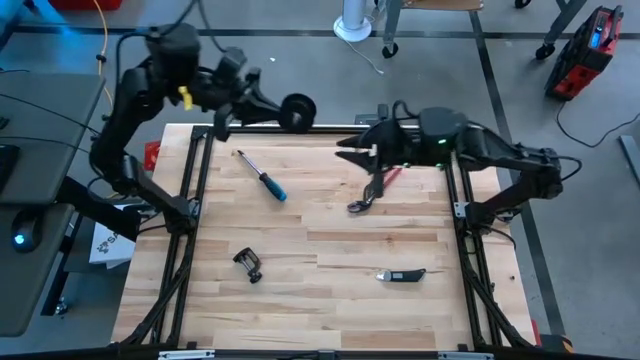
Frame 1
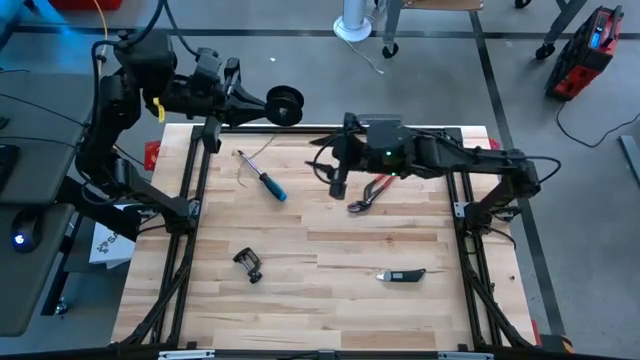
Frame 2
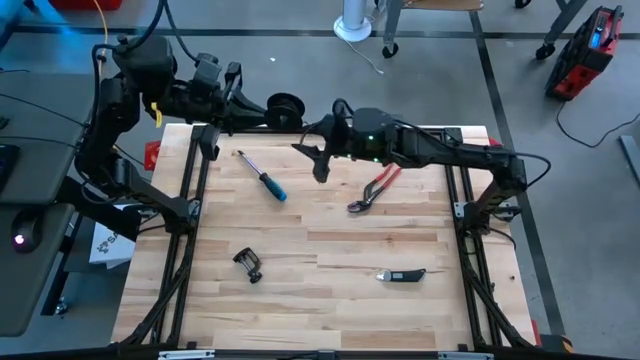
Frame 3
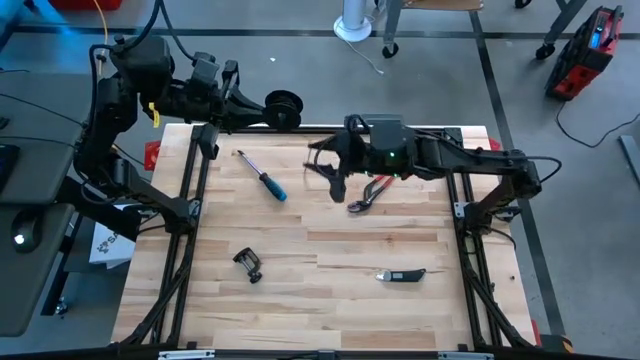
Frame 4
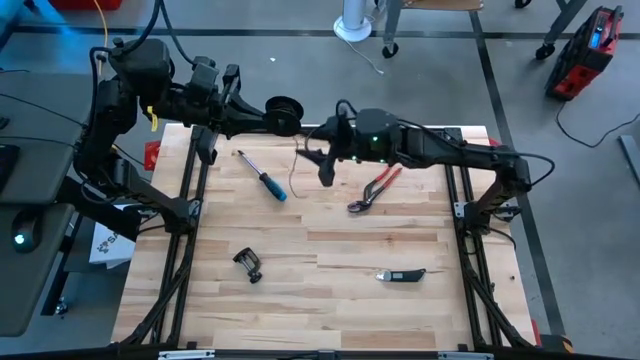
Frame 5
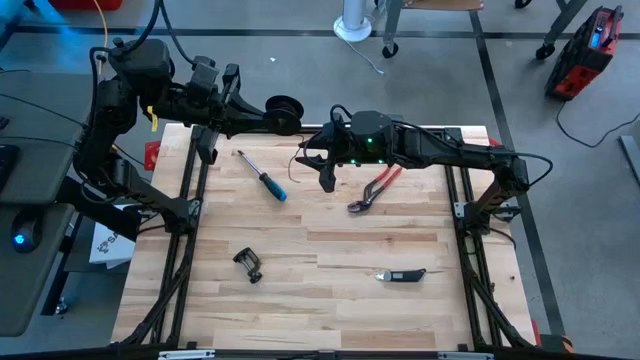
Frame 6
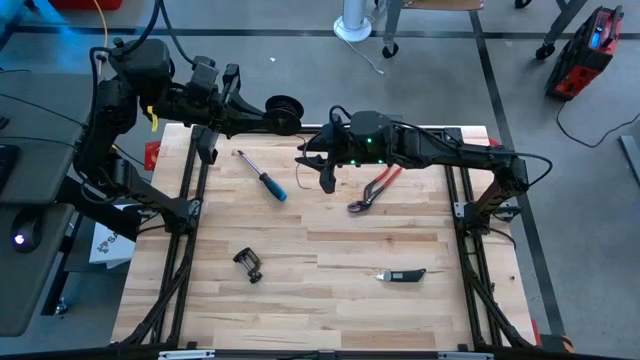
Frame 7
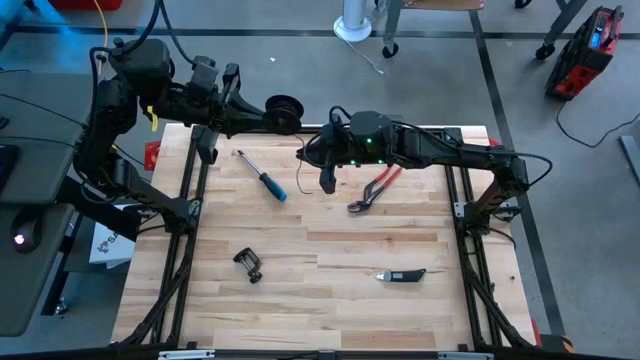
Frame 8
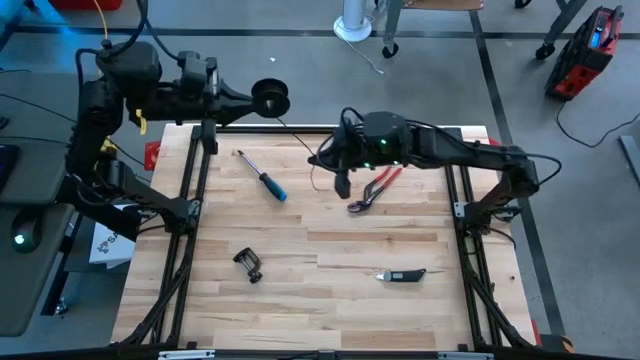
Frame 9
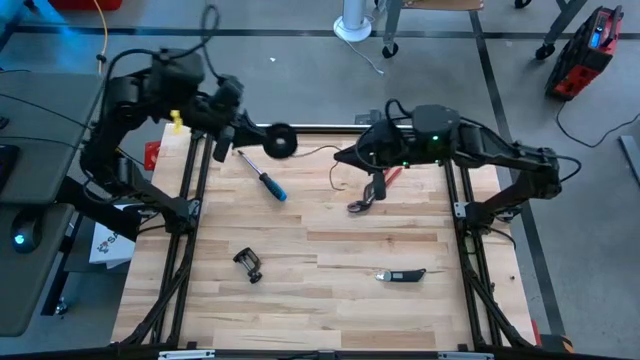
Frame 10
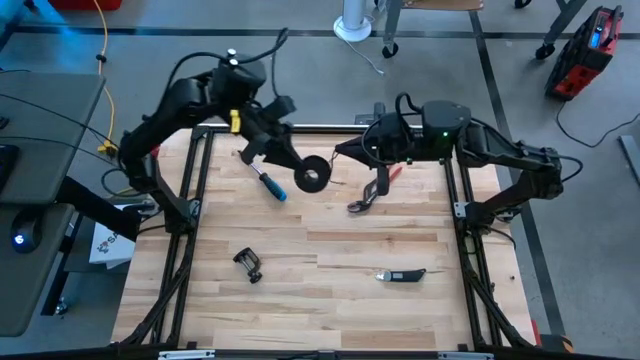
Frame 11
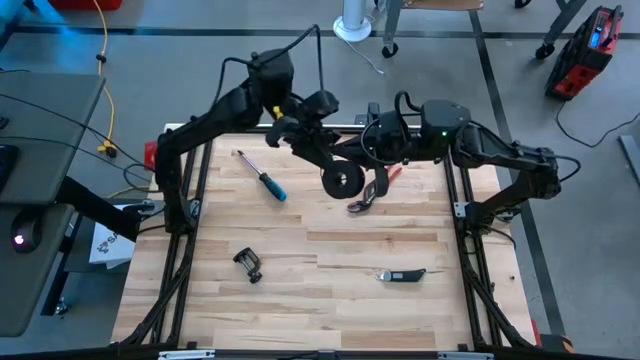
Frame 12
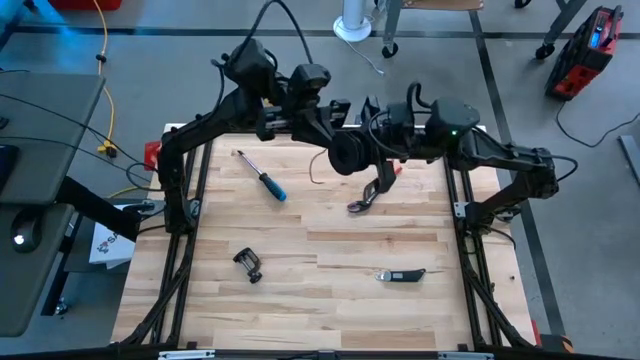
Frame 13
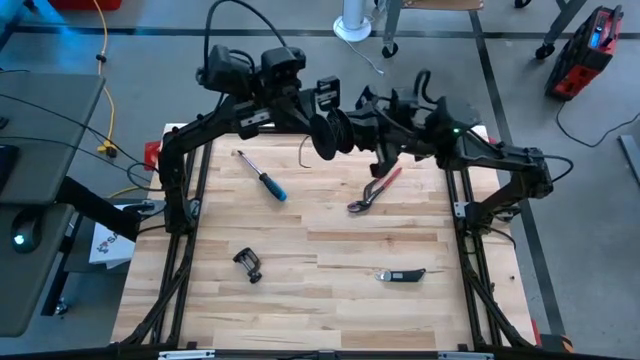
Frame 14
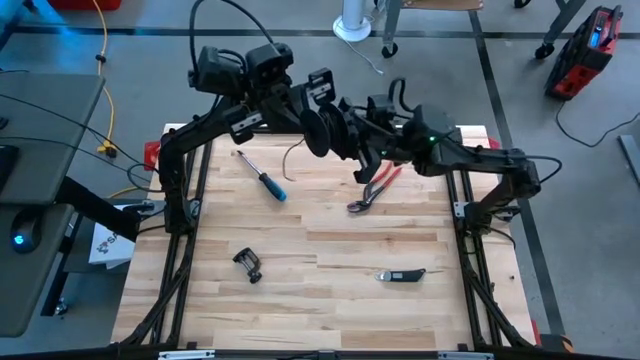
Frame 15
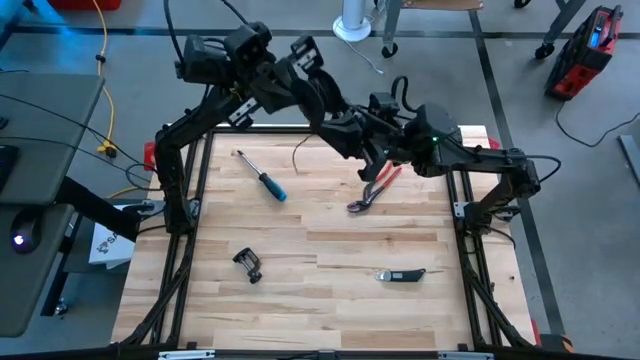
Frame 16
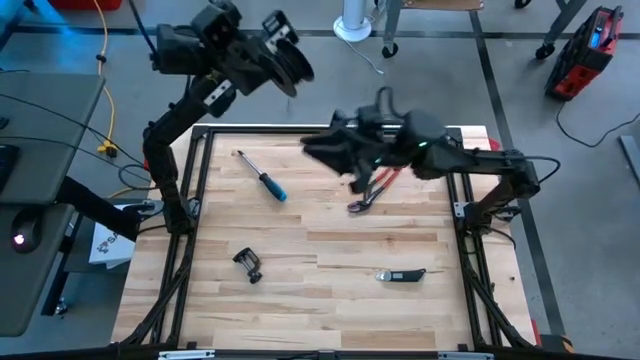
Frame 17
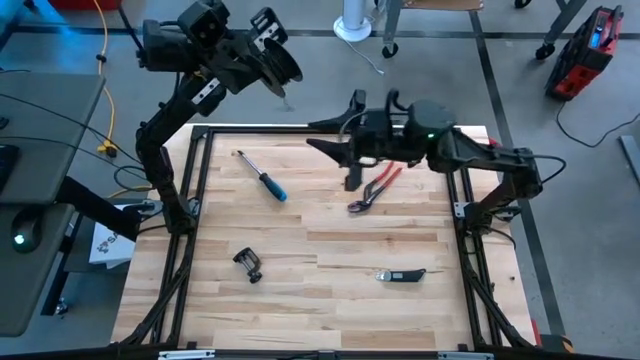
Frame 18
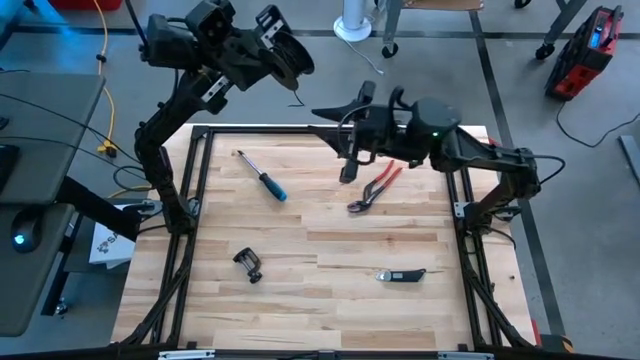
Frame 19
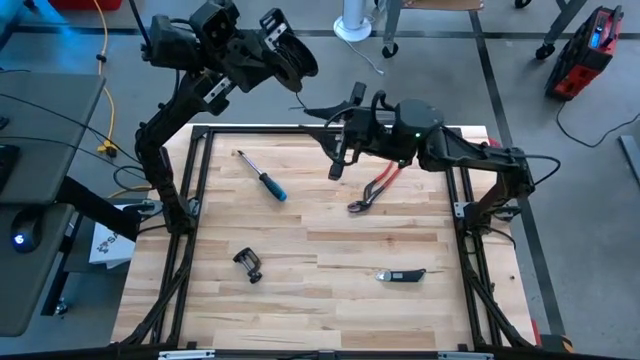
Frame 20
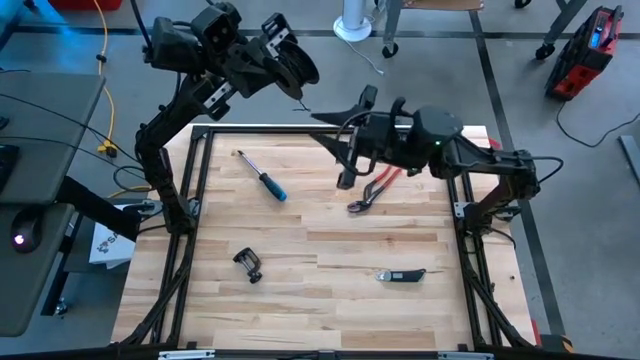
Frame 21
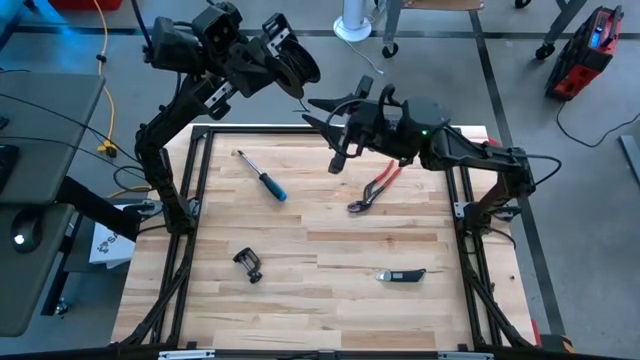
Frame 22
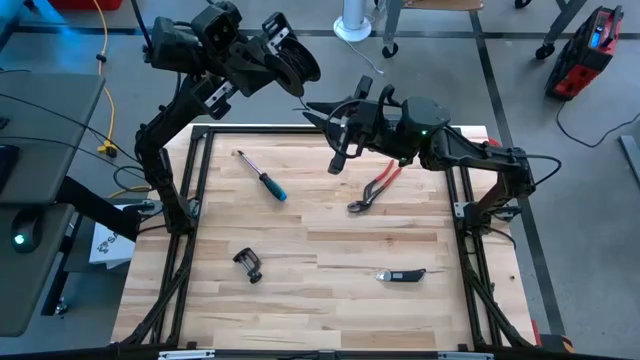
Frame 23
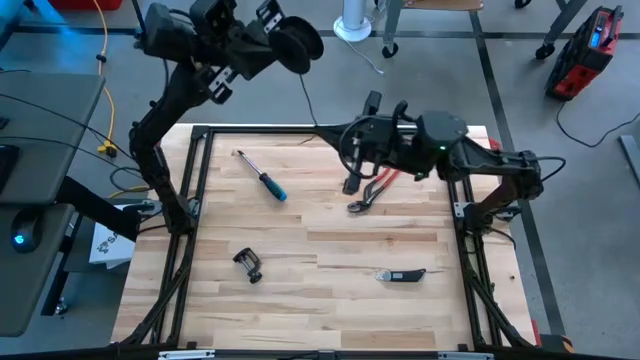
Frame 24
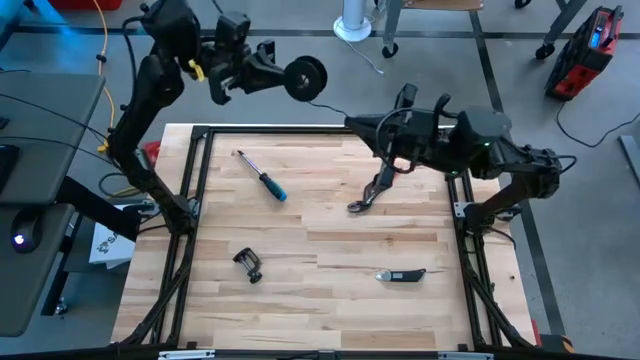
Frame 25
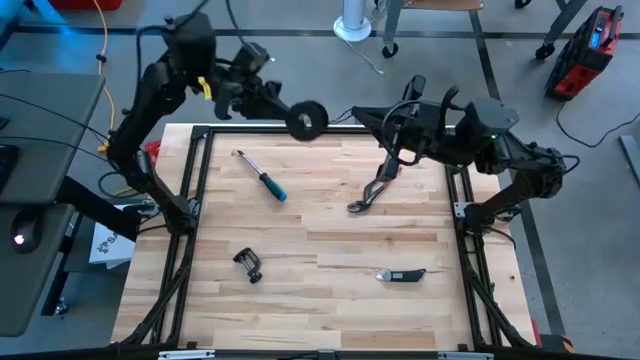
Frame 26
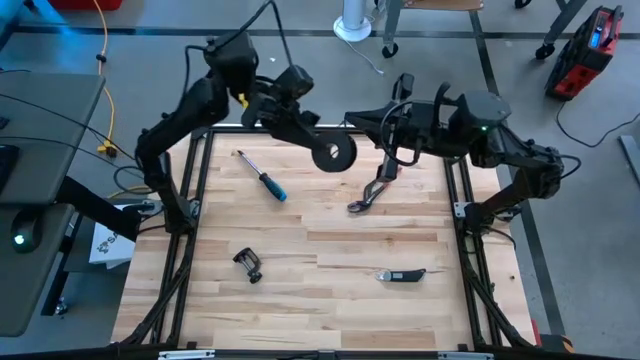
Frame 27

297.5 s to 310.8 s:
Task: Coil cords
Coil the black wire onto the black spool

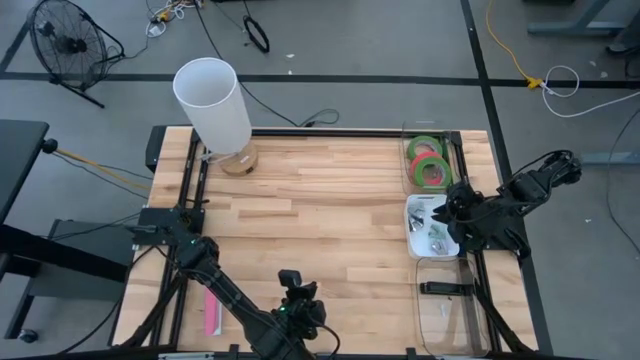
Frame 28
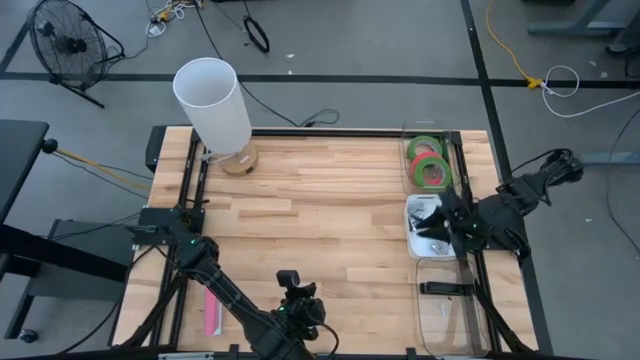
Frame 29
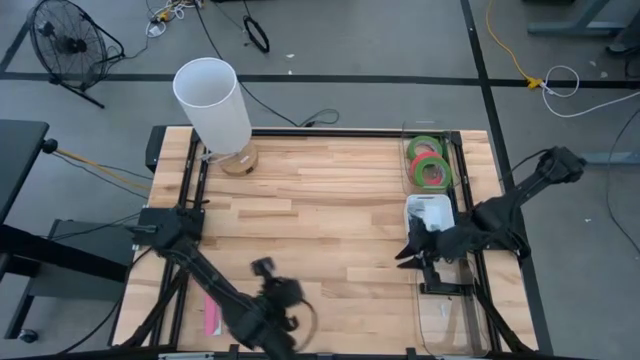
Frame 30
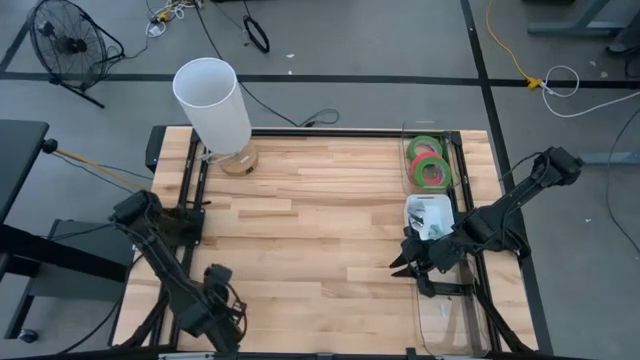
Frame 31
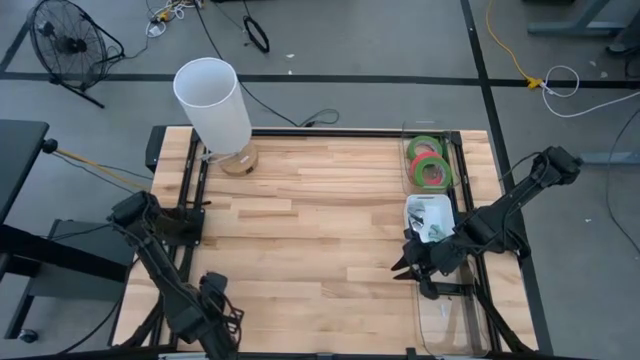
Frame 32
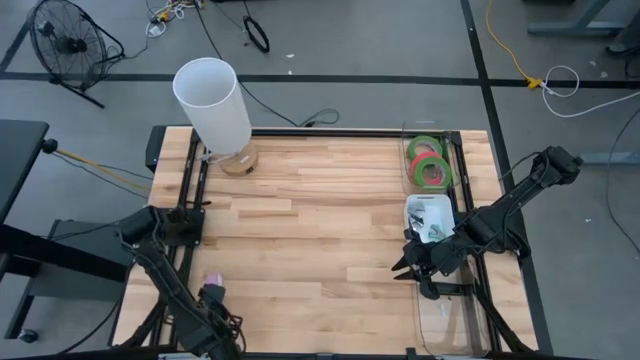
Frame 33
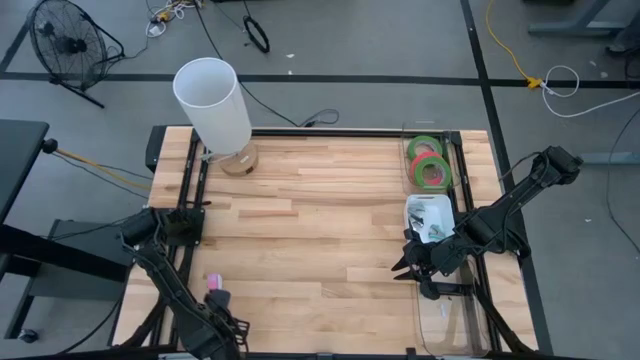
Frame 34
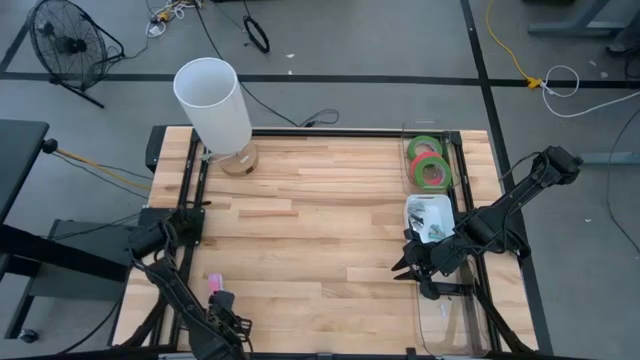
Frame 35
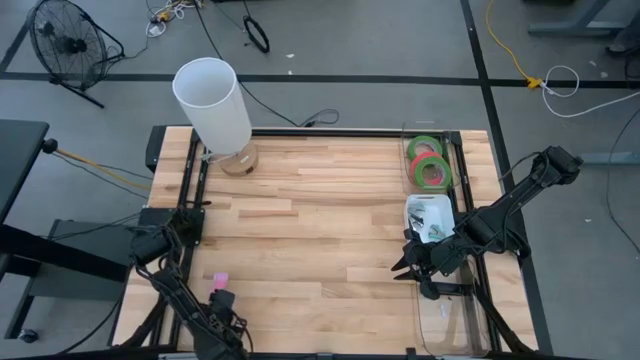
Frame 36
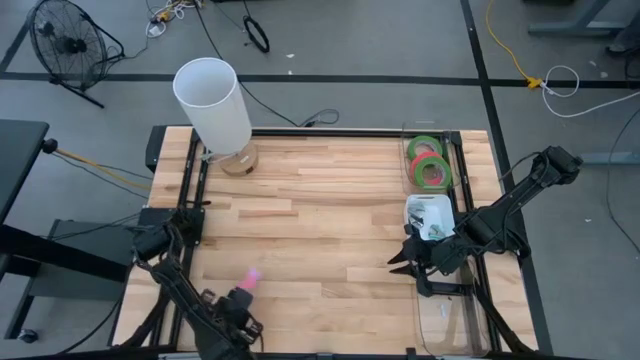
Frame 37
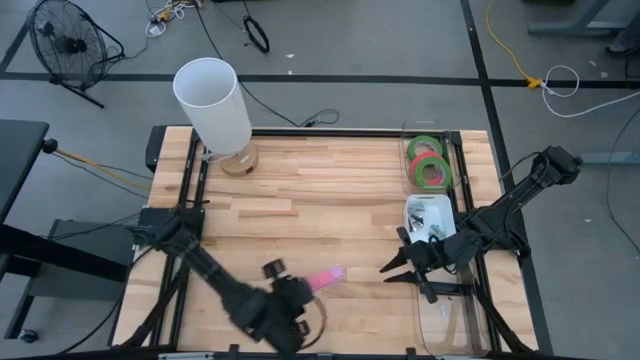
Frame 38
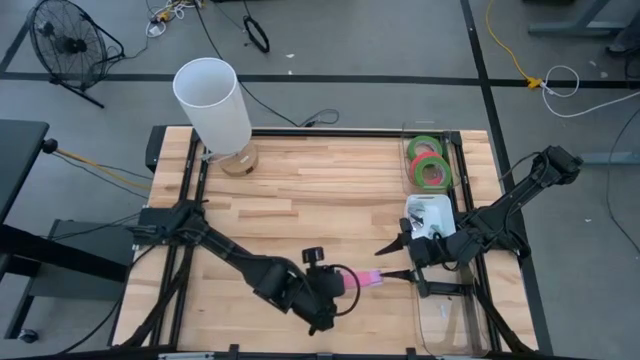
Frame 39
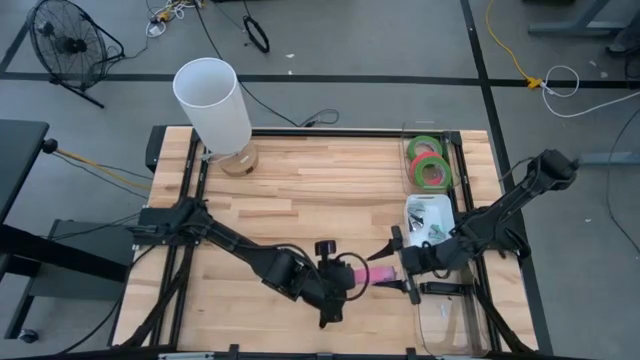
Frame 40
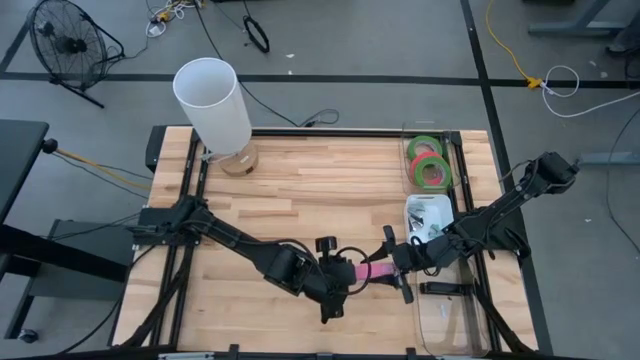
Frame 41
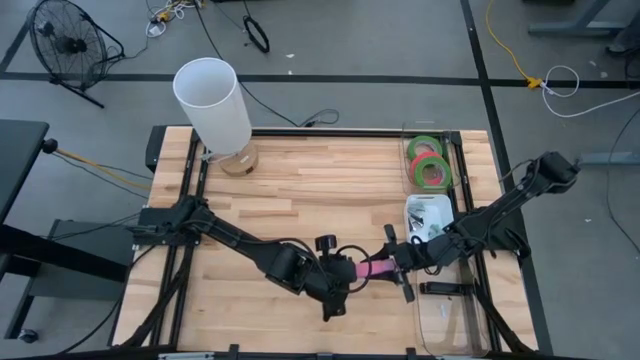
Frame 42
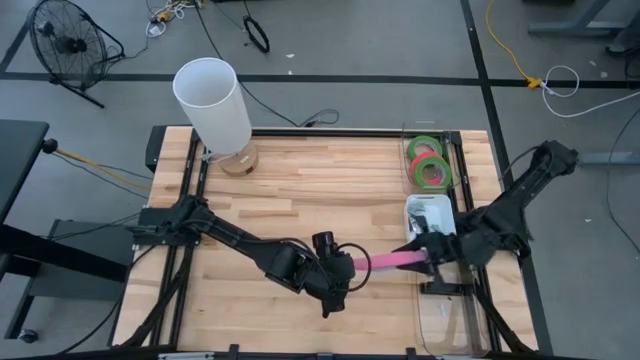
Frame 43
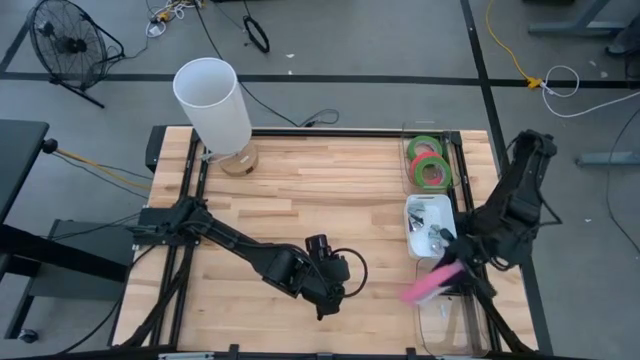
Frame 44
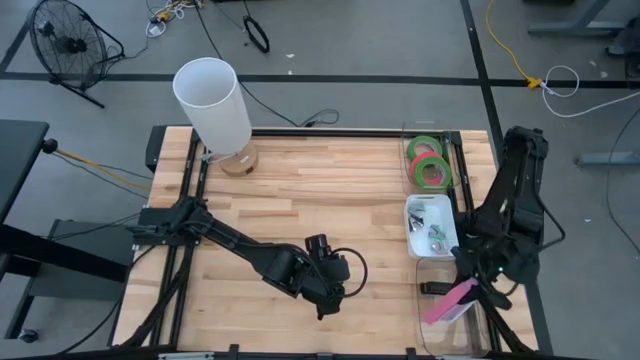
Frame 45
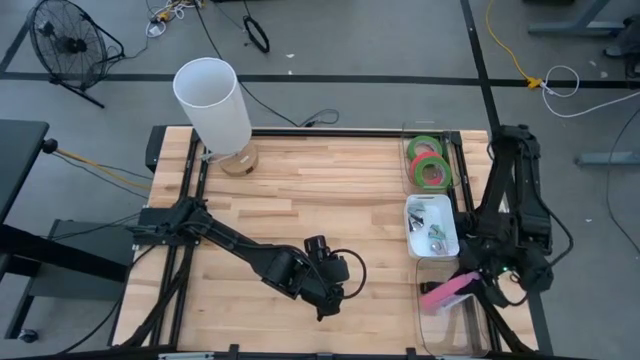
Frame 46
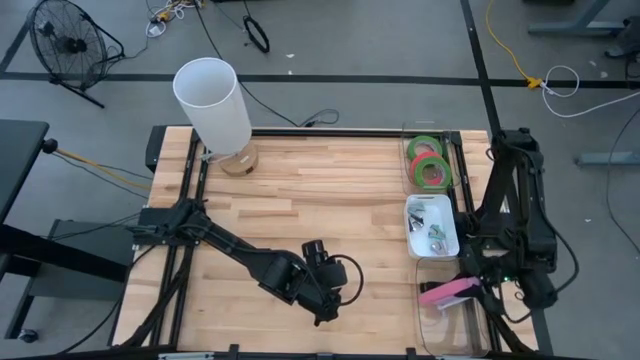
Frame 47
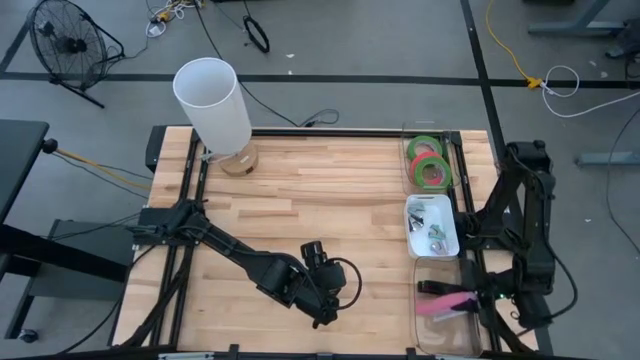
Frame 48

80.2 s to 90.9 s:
Task: Pick and place Stapler, Stapler remover, tape
Put the pink stapler into the bottom transparent bin
